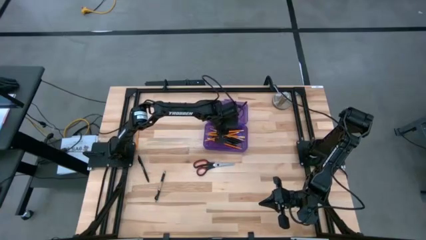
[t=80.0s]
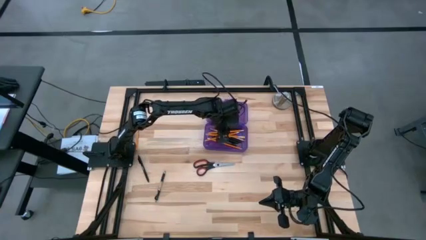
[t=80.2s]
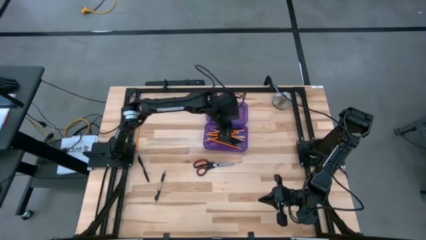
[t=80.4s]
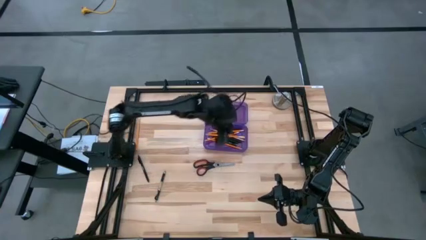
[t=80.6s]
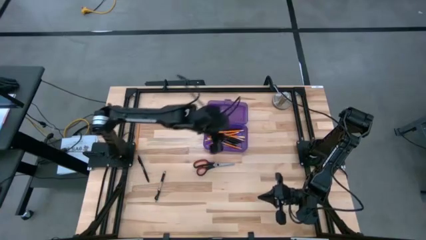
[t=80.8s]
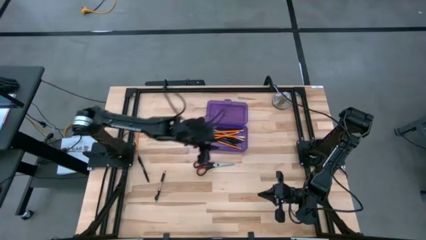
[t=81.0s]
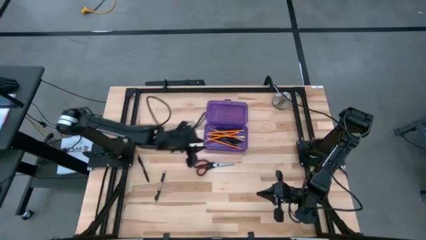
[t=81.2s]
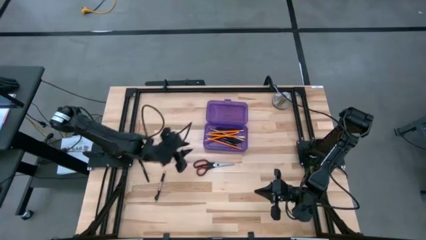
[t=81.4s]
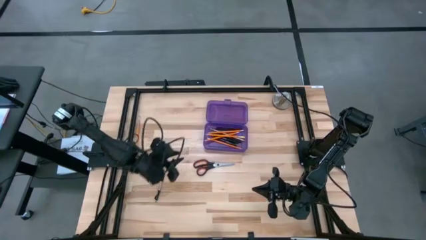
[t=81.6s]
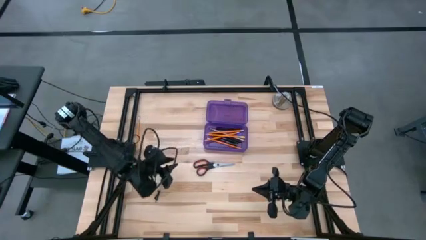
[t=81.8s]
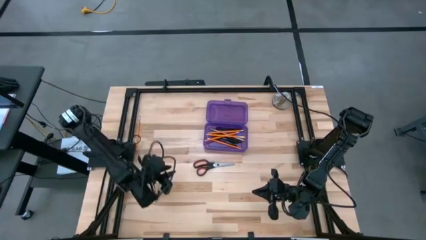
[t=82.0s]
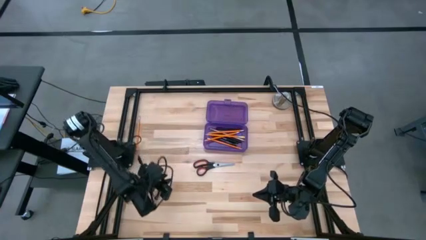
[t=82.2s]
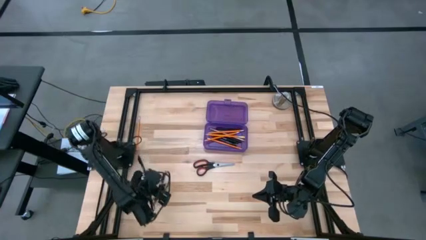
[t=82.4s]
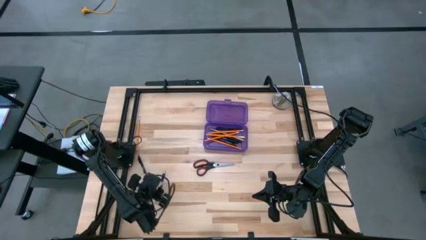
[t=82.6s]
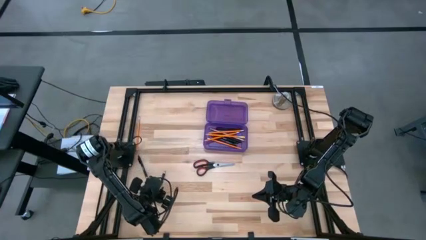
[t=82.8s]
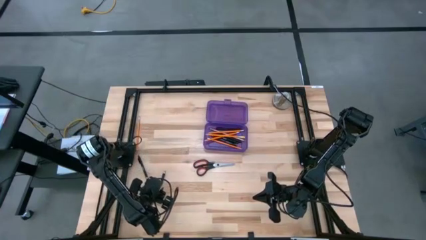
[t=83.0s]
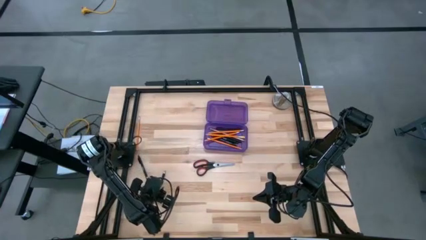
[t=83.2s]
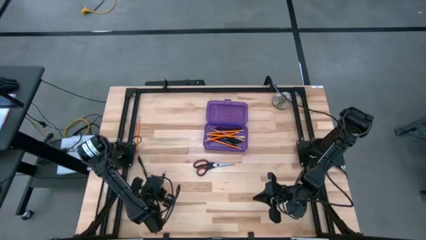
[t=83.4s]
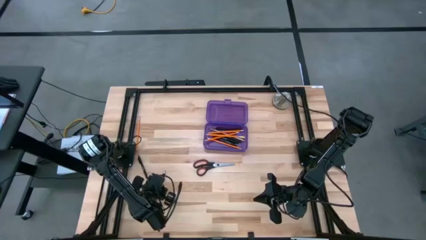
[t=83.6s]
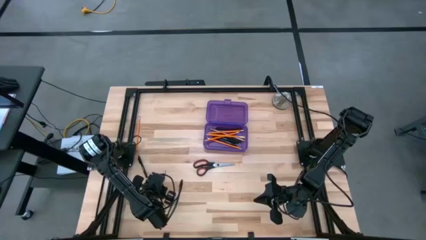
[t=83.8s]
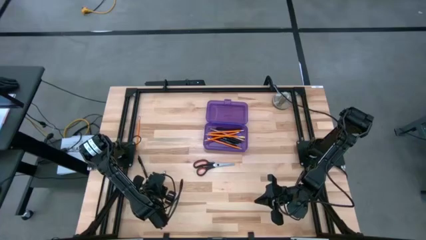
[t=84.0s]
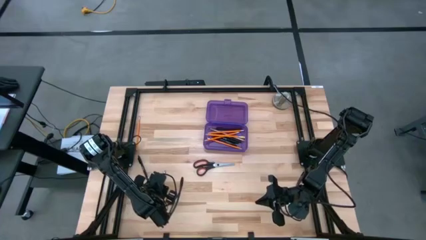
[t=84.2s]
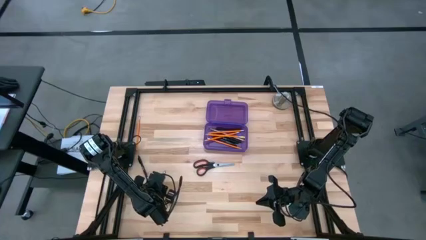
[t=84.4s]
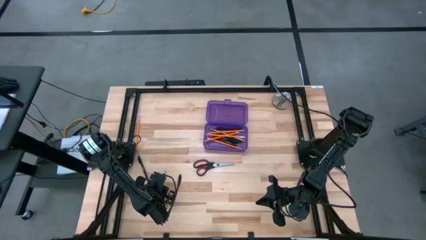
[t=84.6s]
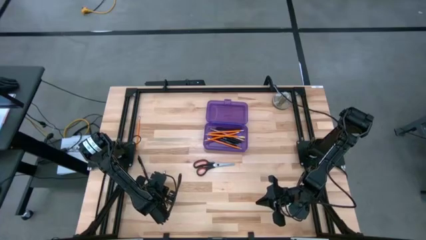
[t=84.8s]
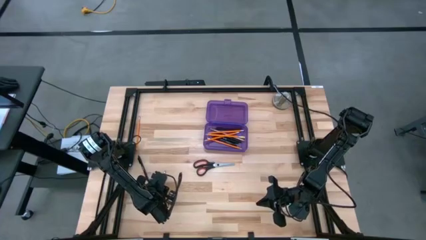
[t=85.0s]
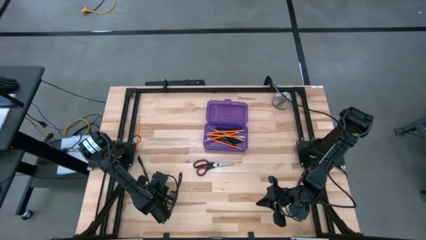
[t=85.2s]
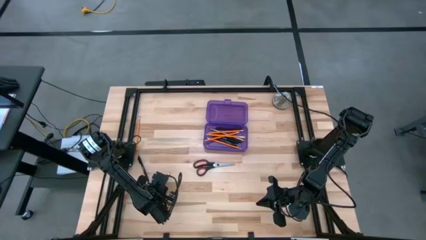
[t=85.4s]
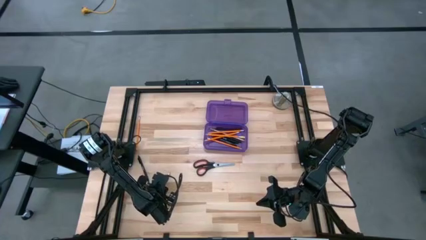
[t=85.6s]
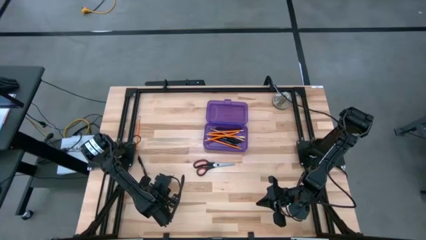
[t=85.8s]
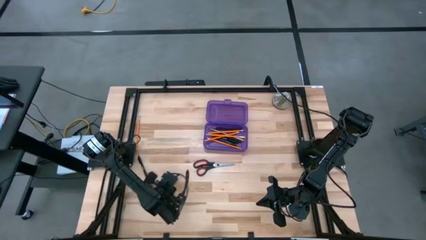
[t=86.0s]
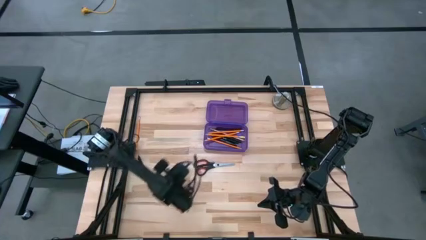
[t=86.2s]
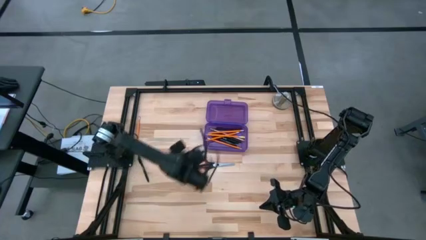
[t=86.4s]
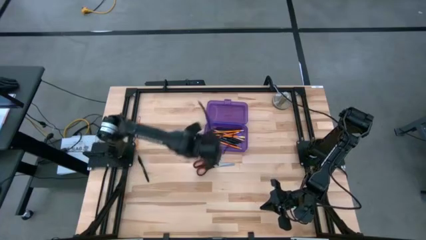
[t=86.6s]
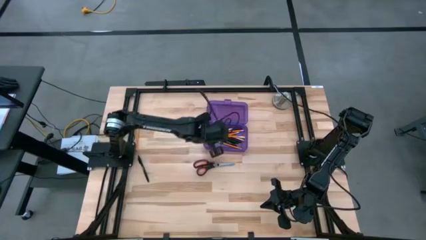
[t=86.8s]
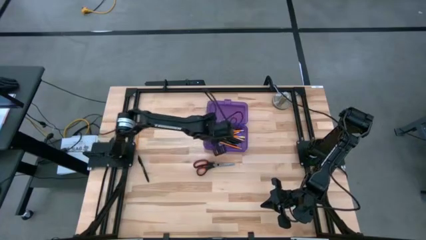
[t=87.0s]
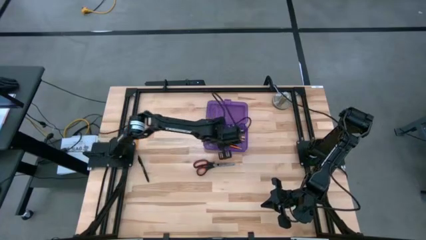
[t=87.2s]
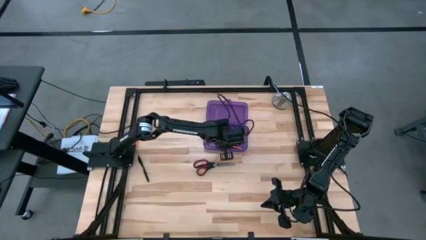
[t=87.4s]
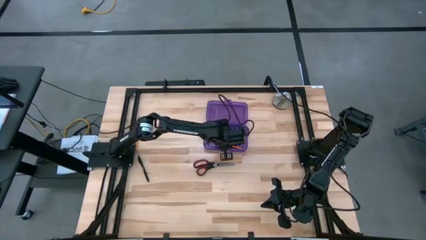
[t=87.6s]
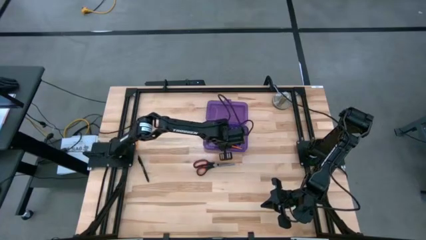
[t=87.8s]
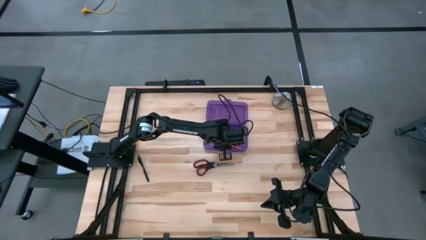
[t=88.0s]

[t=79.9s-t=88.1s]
Task: Pick & place school supplies into a supply box
Put the bottom black pen into the pencil box

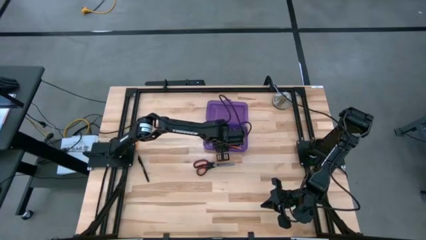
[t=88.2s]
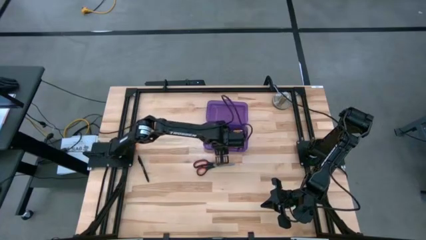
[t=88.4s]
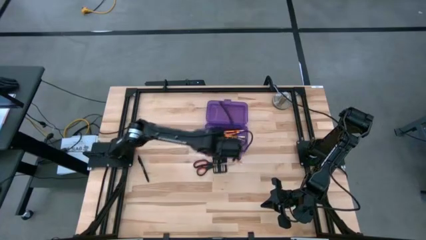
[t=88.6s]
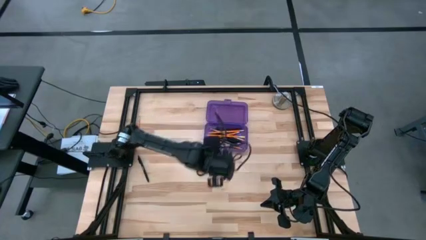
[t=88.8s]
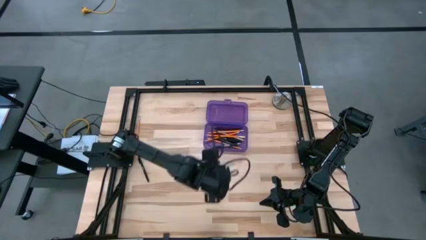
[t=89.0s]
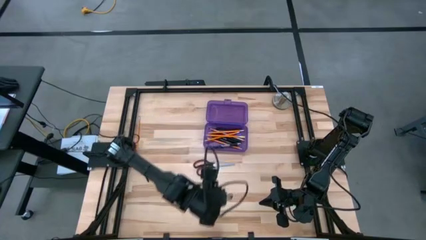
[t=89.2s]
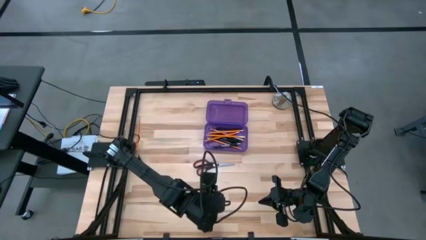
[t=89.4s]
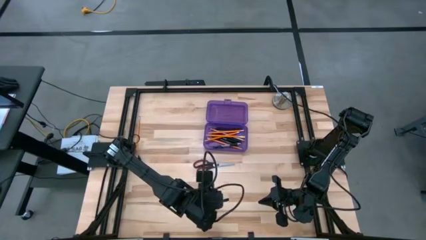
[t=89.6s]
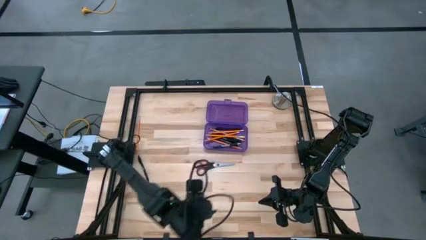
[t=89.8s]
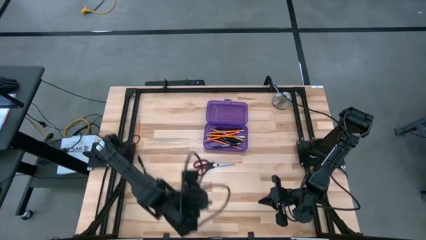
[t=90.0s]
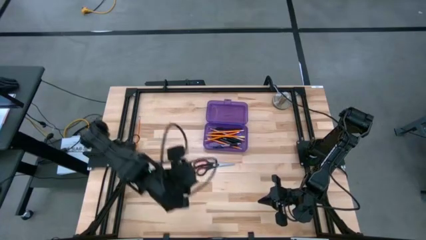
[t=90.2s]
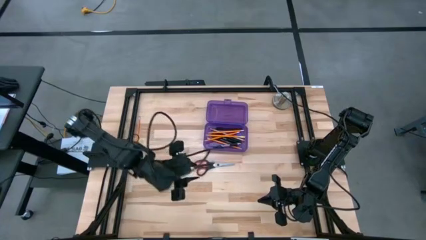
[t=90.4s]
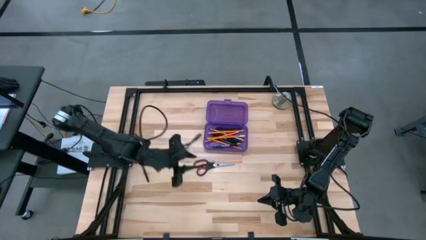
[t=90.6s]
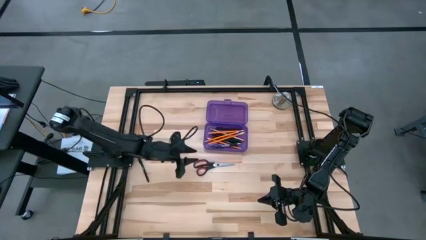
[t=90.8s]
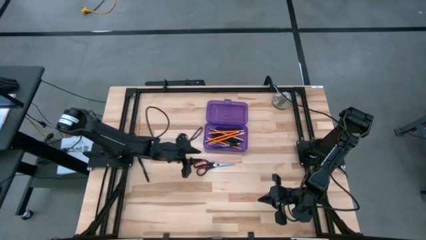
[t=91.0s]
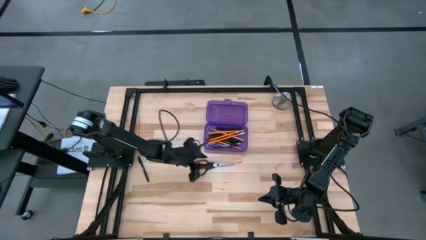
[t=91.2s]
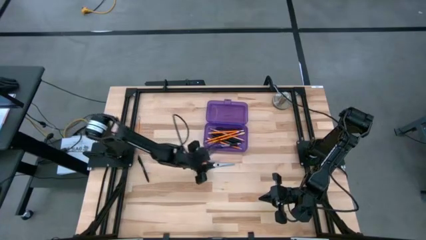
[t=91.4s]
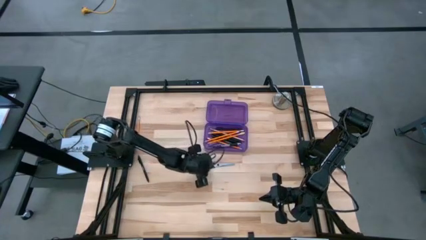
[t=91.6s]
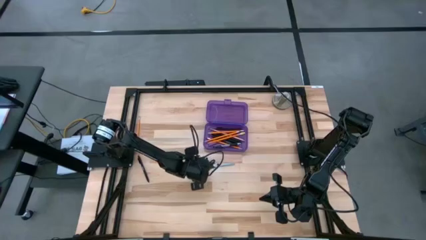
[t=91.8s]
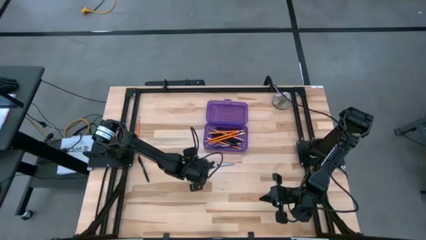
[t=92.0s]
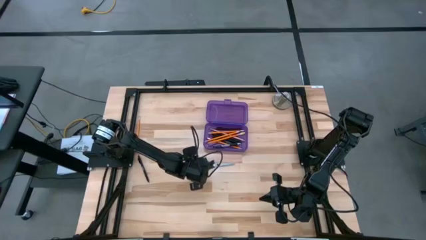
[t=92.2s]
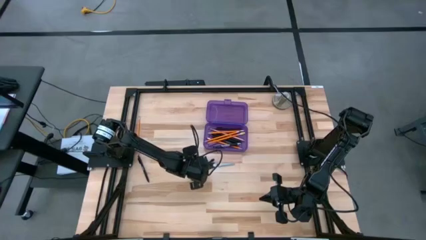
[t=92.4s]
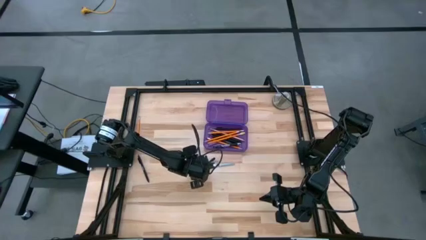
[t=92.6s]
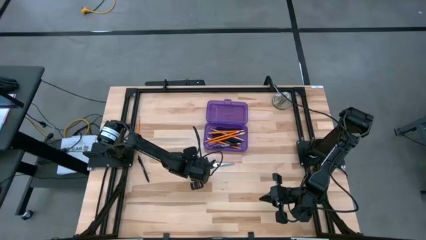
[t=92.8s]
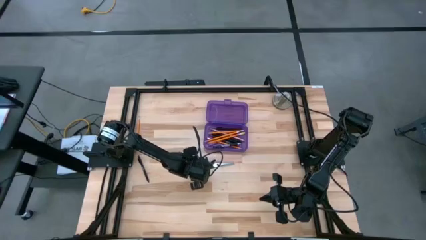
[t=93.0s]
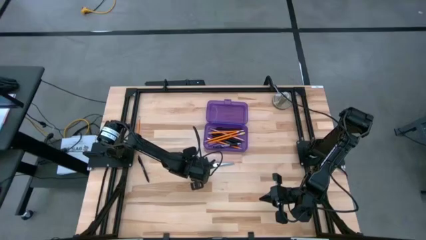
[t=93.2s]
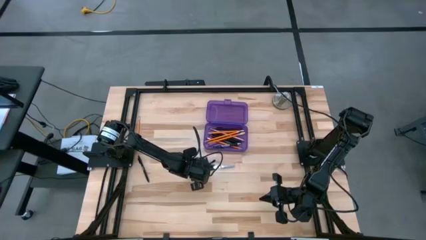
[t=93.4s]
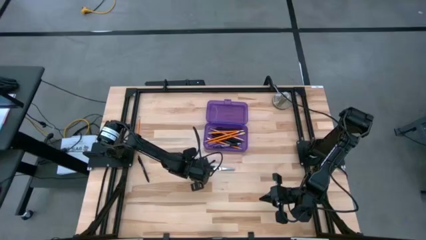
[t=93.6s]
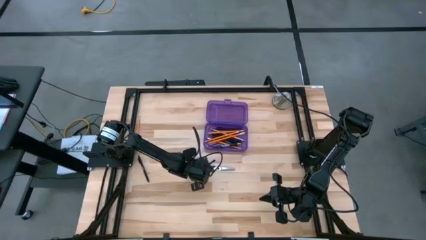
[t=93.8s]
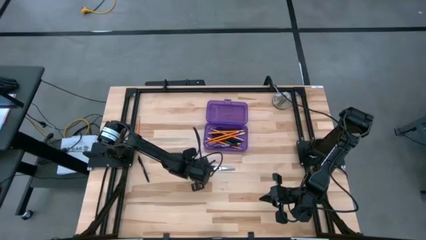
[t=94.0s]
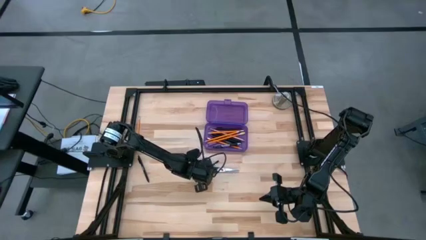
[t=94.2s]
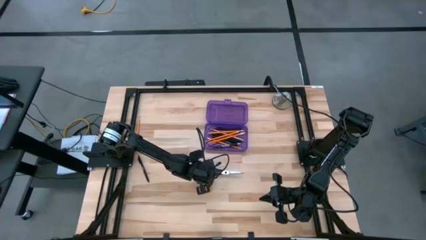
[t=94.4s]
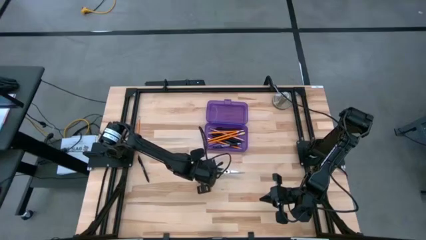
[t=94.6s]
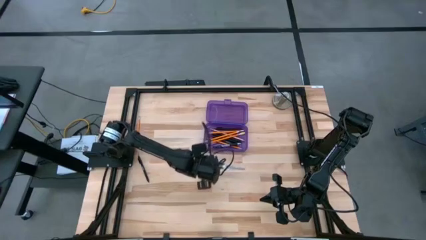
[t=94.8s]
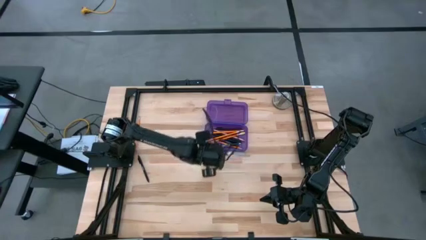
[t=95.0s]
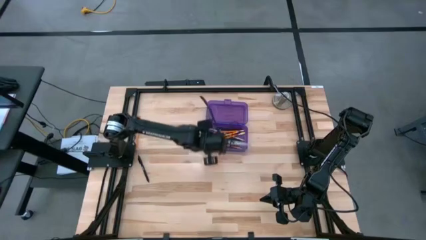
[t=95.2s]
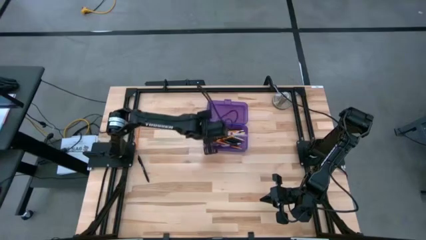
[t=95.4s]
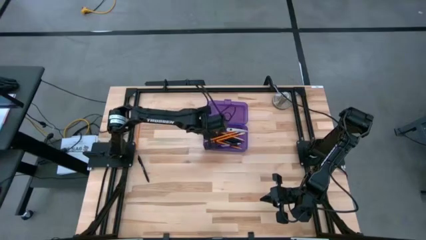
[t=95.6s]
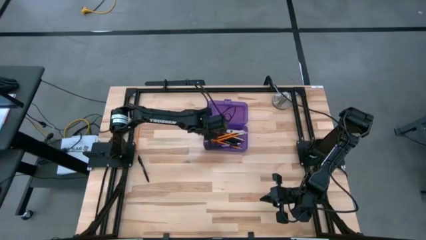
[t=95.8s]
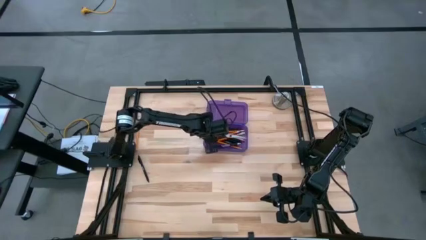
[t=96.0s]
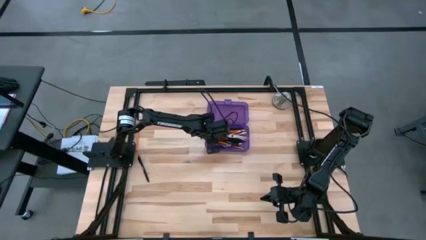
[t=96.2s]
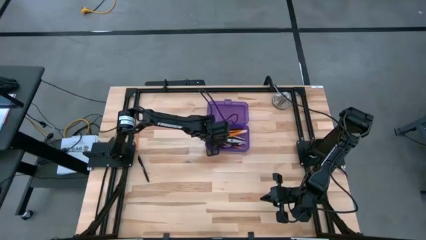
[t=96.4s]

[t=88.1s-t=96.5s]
Put the black scissors into the pencil box
